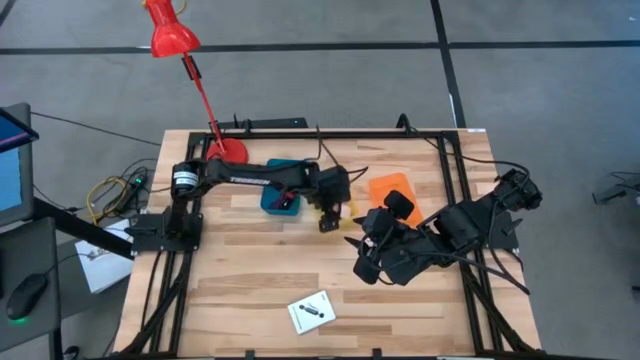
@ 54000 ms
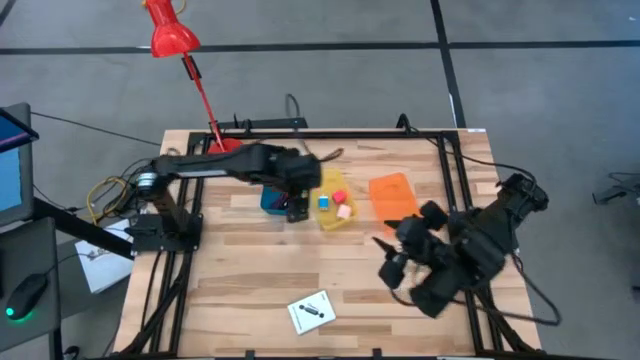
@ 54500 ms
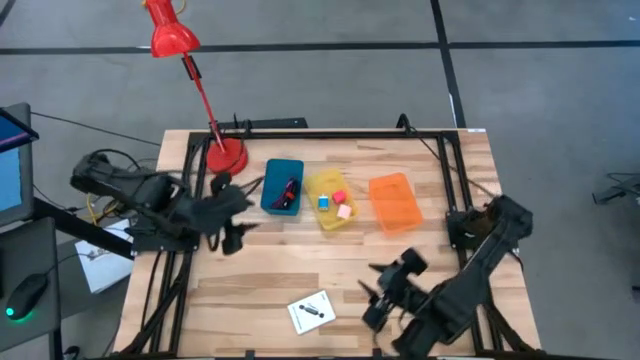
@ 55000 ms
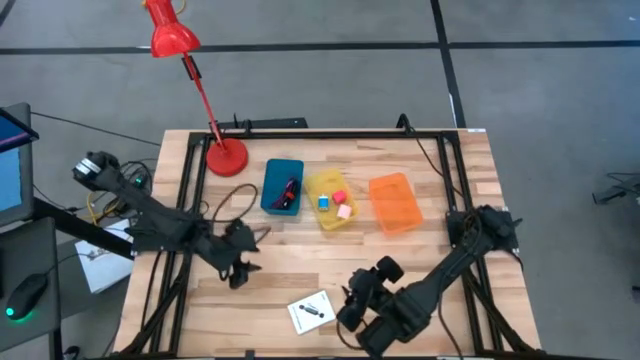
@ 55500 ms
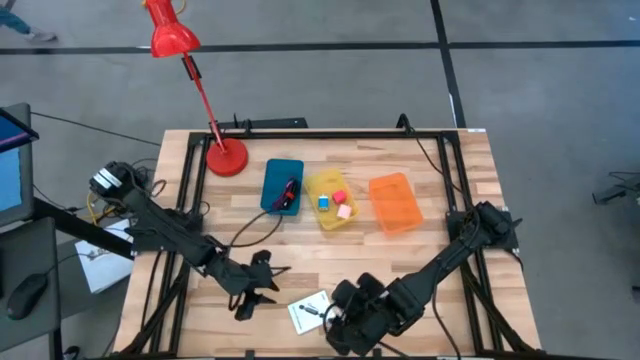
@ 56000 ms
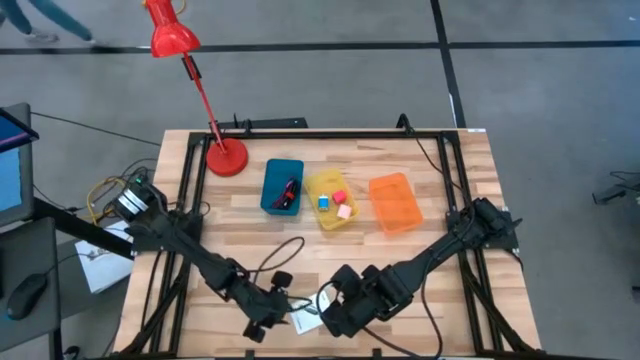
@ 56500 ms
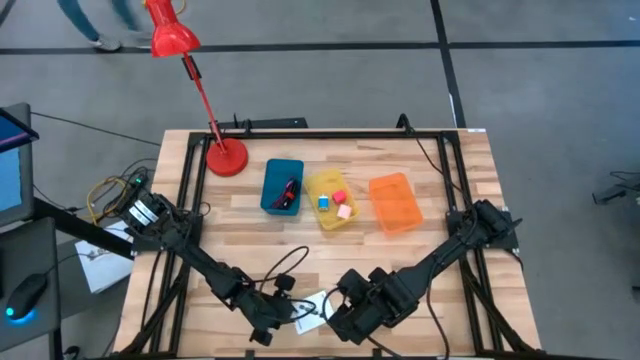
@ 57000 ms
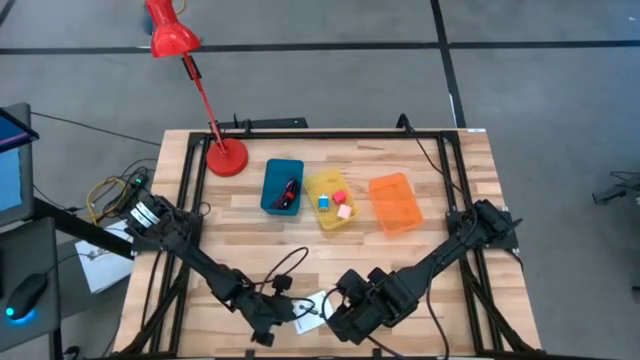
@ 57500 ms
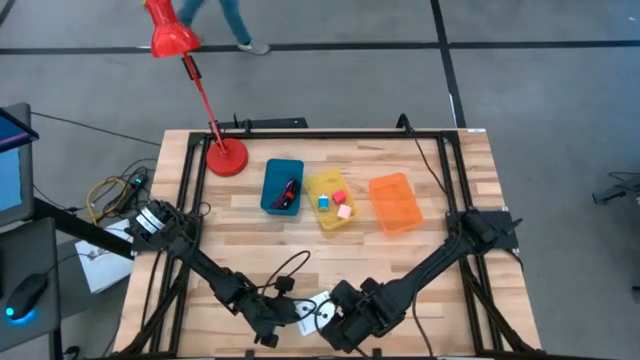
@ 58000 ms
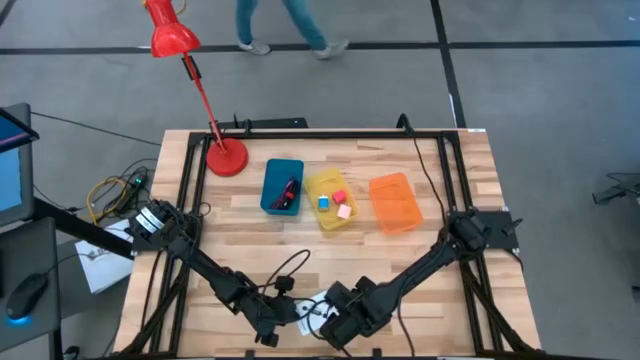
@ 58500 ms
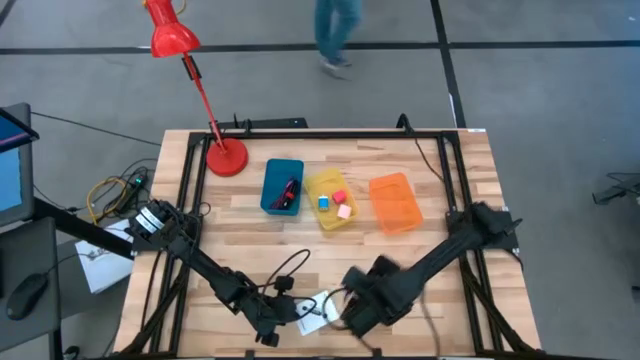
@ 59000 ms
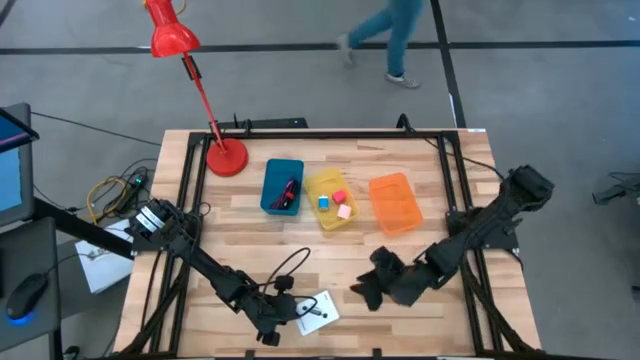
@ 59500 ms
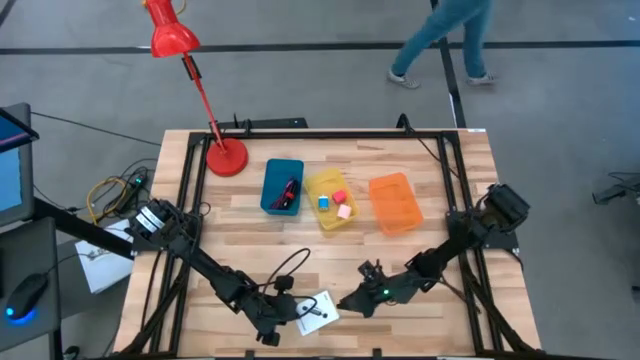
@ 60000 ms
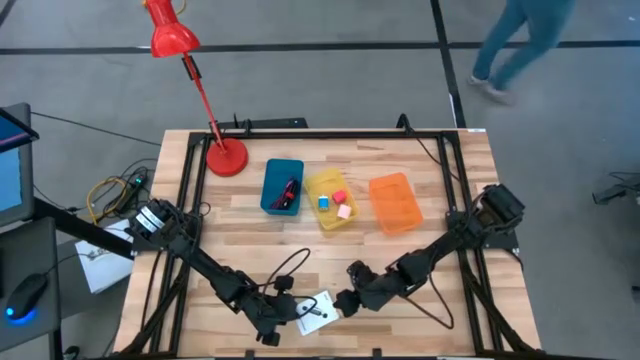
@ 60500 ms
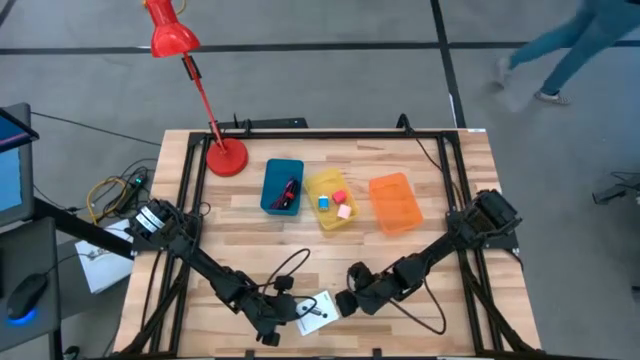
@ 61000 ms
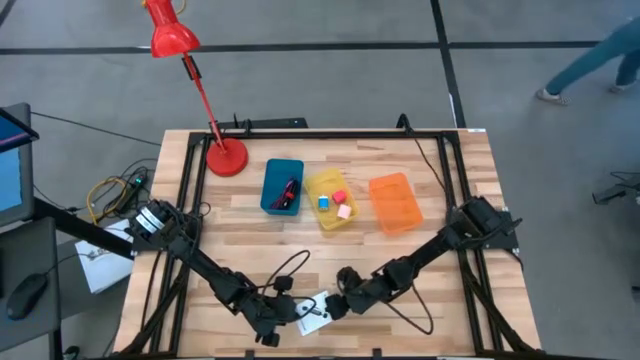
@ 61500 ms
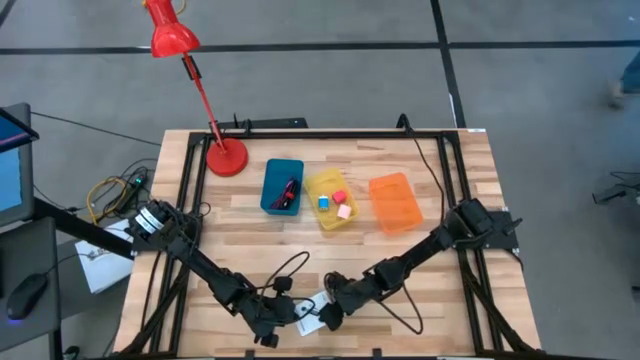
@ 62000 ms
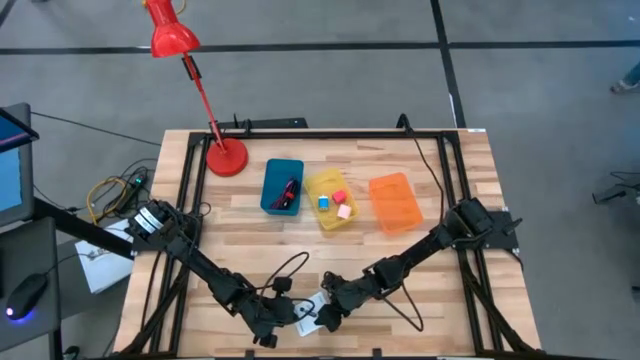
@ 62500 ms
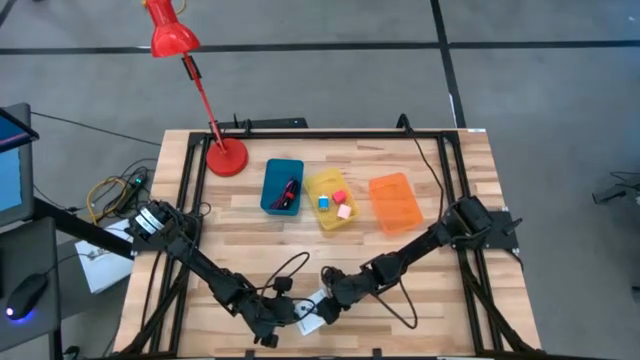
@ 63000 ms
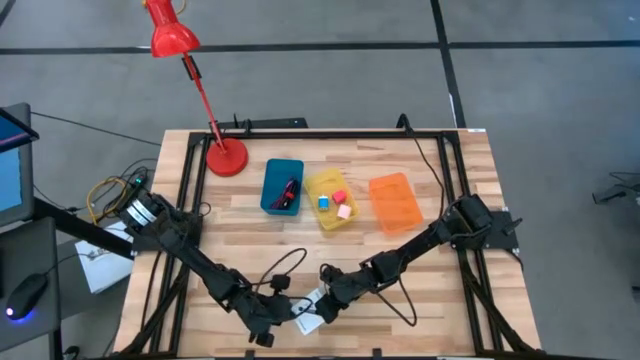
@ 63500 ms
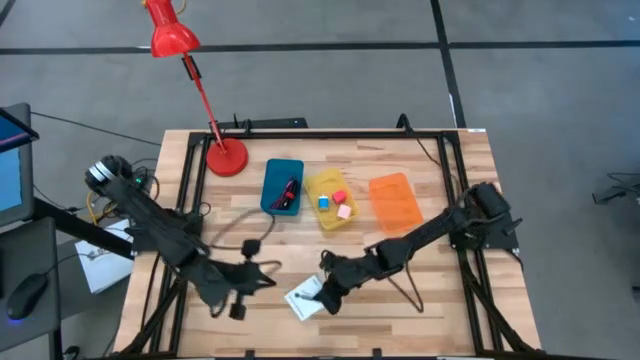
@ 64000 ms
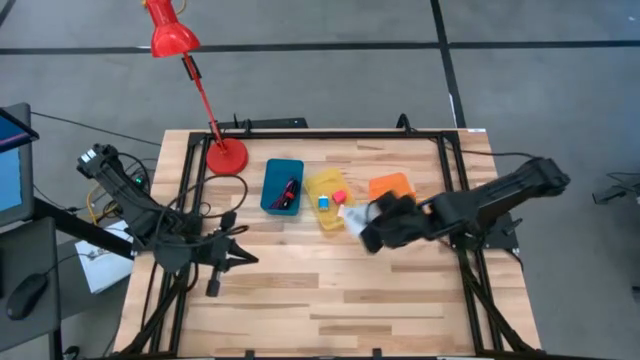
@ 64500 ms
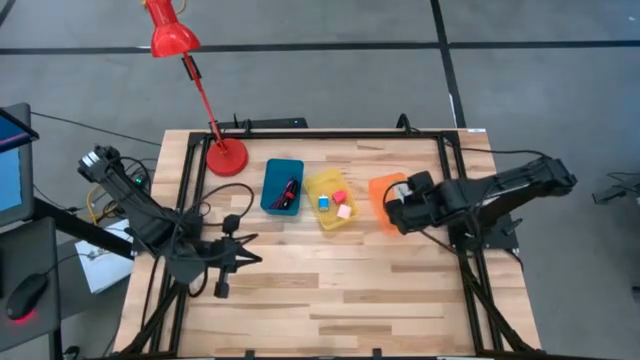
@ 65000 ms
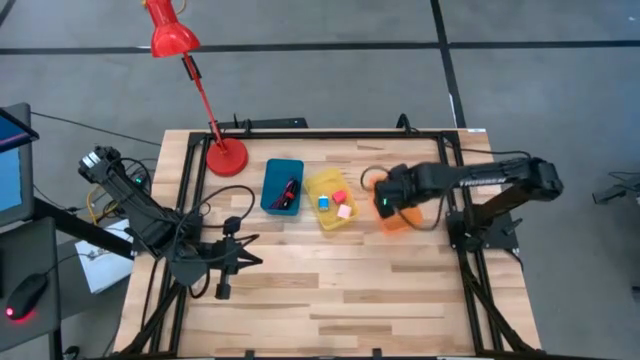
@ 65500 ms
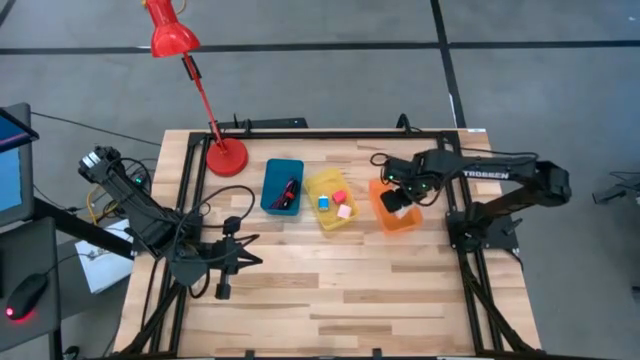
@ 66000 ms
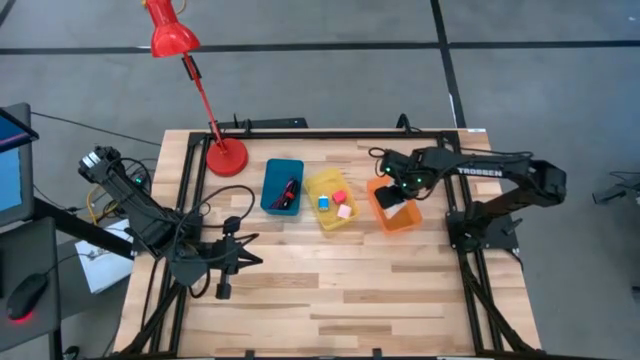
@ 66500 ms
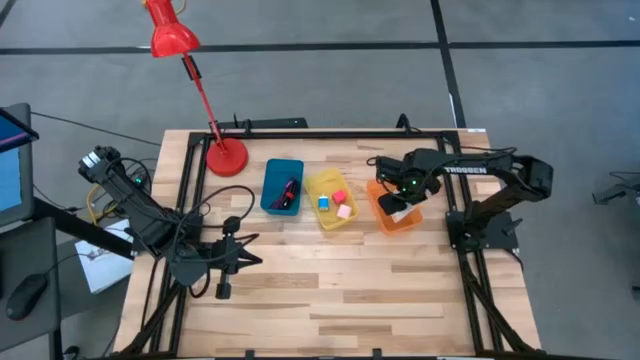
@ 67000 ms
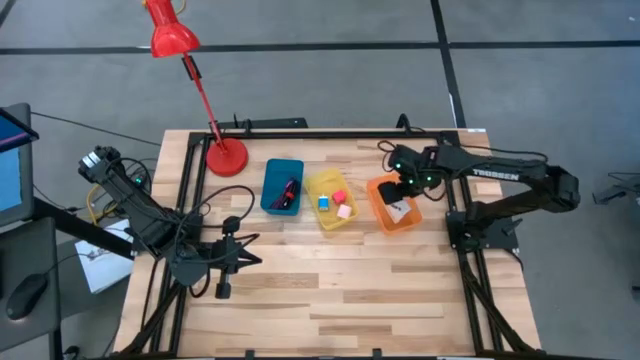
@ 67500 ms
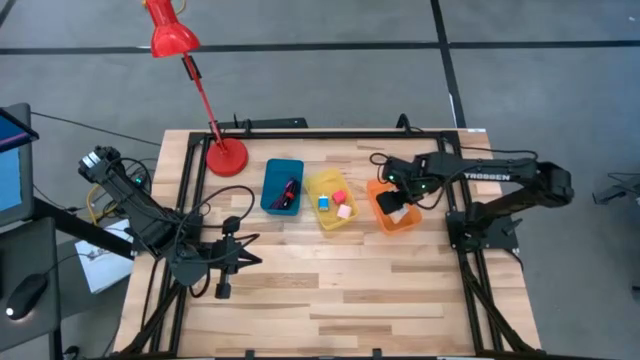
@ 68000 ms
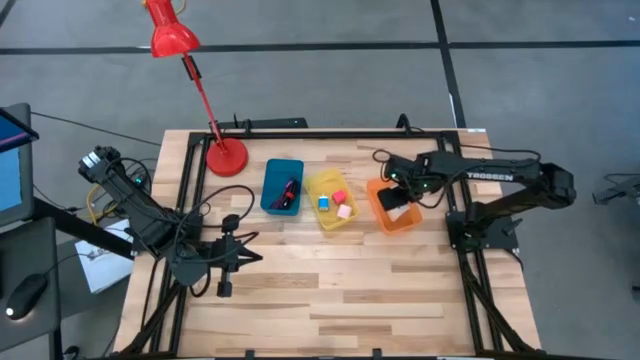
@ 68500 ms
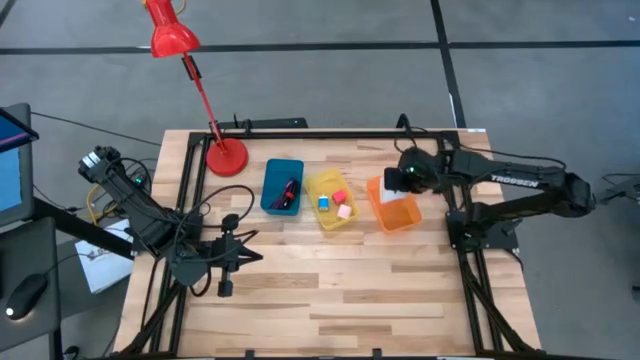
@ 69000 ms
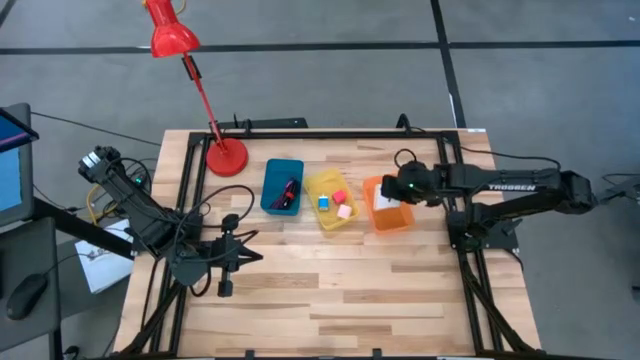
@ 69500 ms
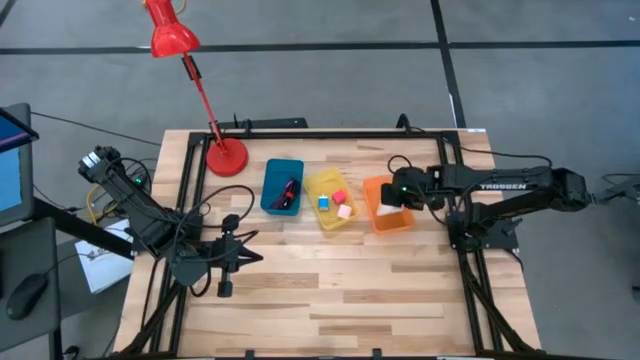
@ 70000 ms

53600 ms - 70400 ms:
Task: Pick and place items into bin
Put the white card reader box into the orange bin

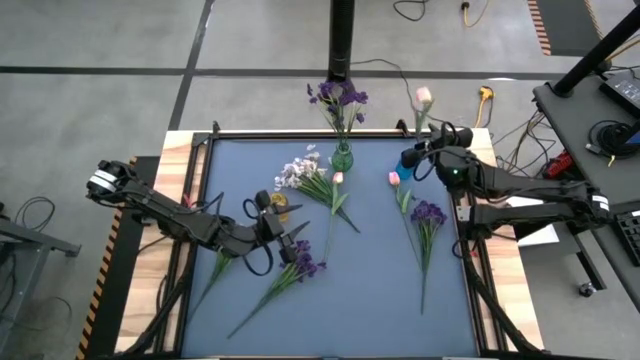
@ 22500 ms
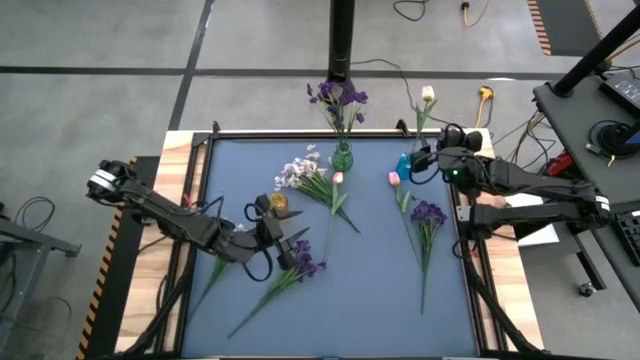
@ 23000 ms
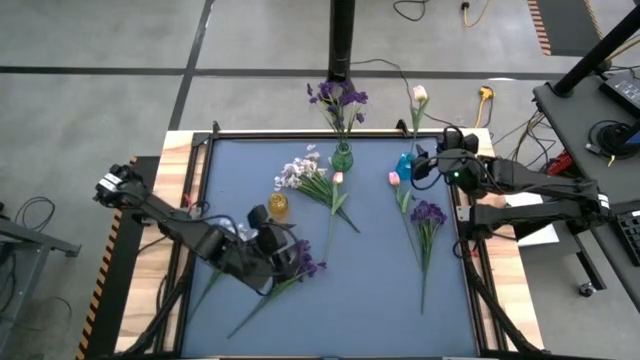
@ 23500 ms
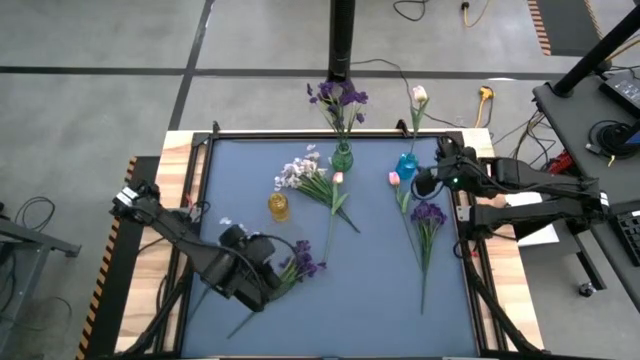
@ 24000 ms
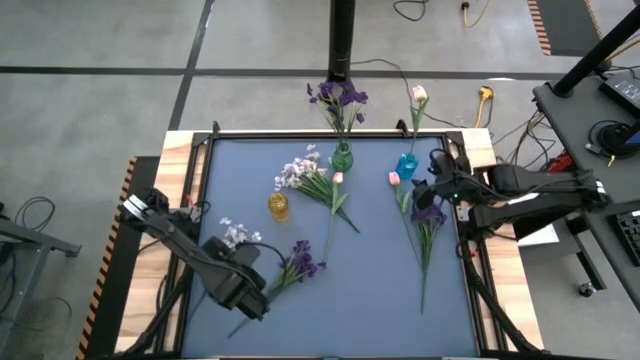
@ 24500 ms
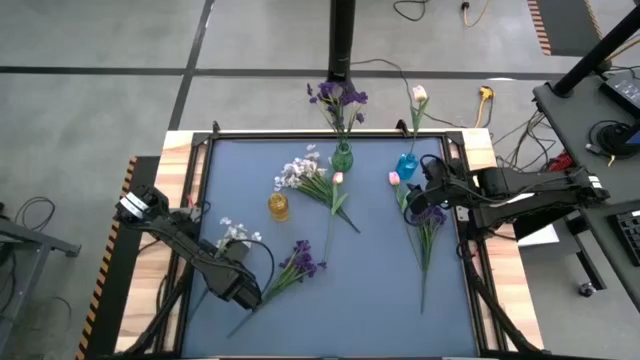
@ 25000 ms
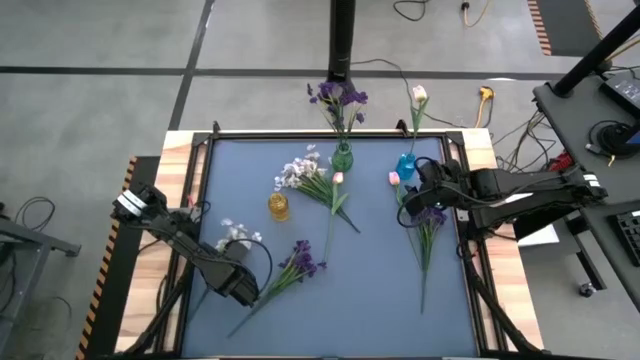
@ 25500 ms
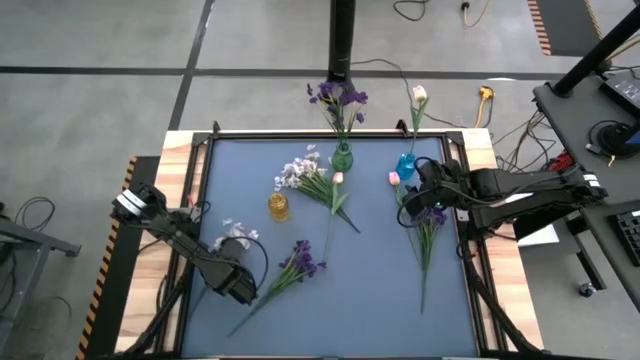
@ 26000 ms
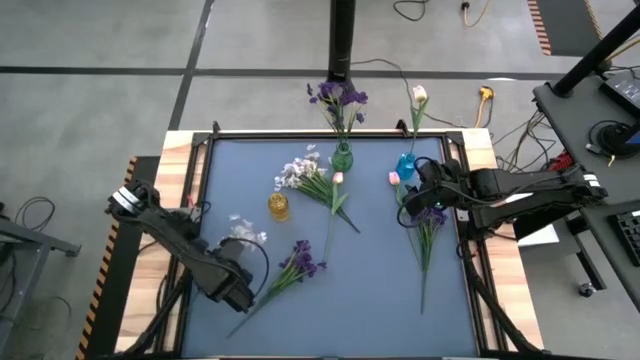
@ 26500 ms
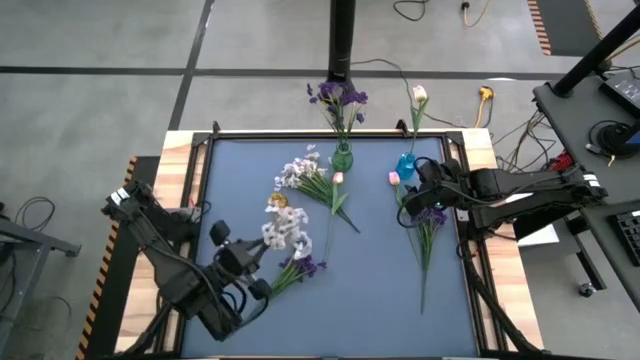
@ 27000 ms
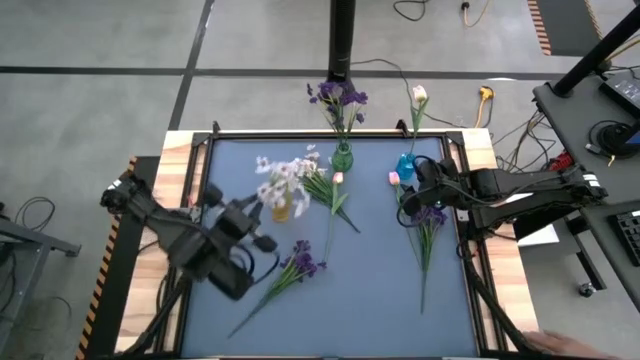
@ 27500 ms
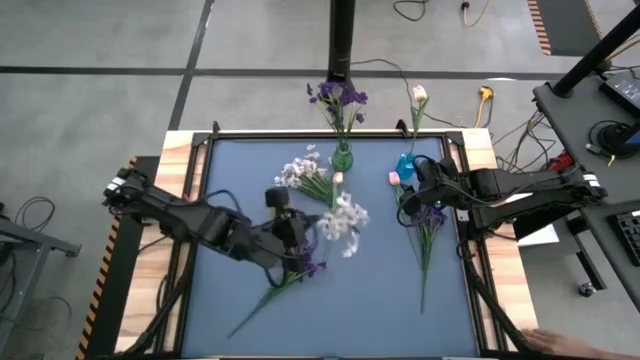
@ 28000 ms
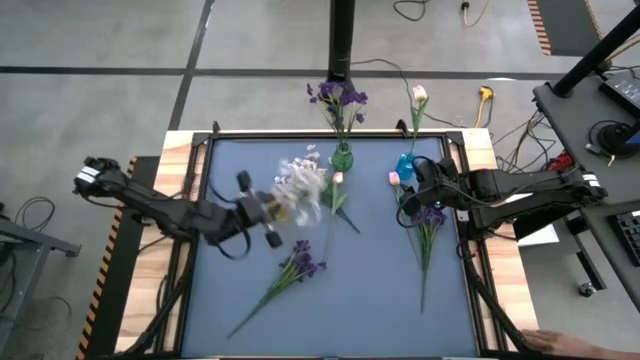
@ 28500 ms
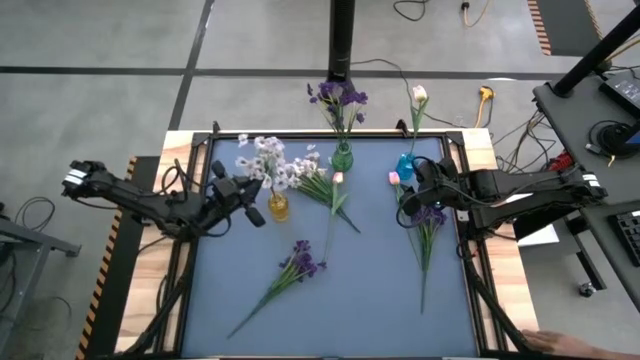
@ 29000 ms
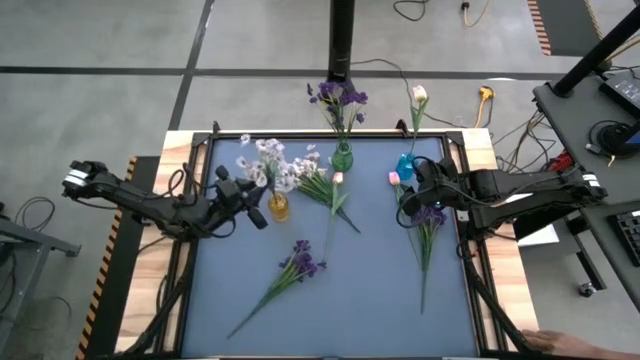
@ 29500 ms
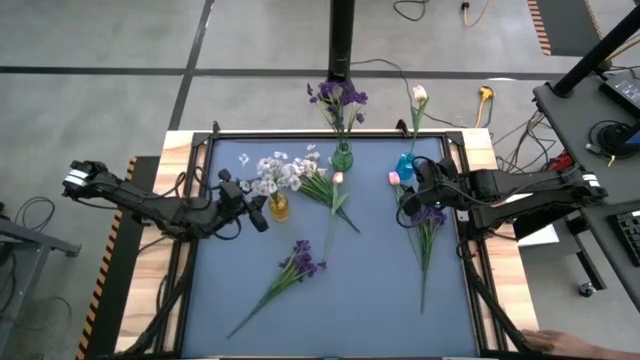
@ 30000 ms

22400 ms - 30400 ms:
Task: Sort flowers into vase by color
Put the bottom white flowers into the yellow vase
